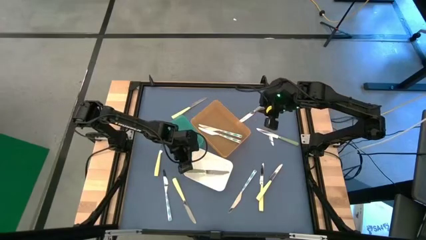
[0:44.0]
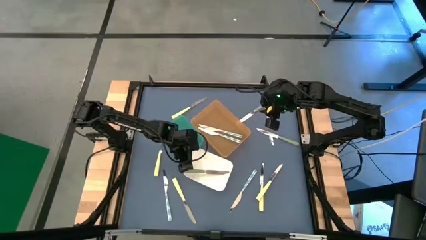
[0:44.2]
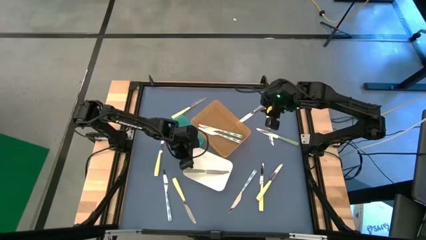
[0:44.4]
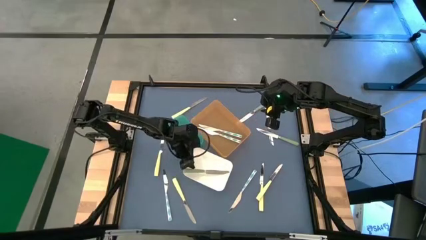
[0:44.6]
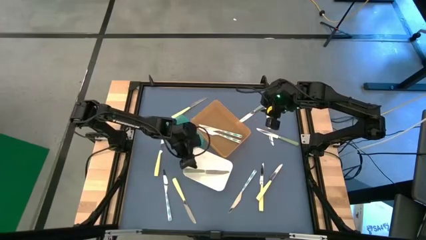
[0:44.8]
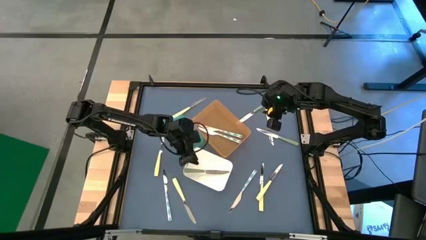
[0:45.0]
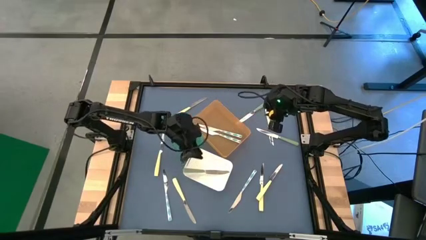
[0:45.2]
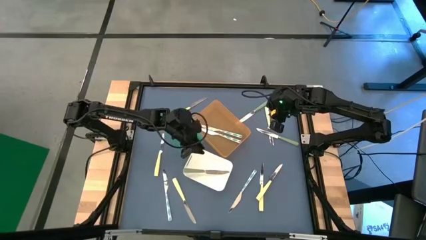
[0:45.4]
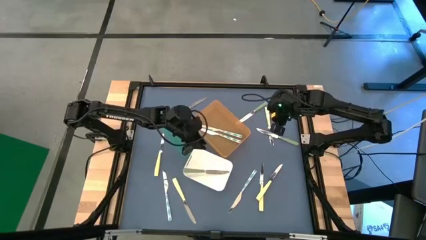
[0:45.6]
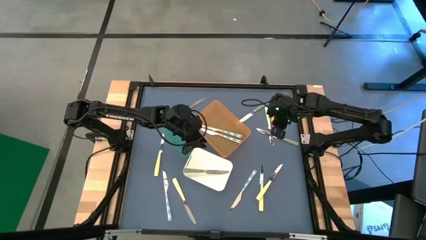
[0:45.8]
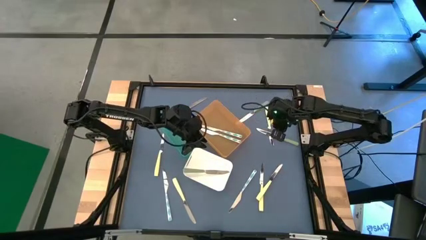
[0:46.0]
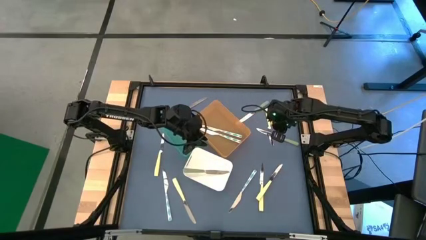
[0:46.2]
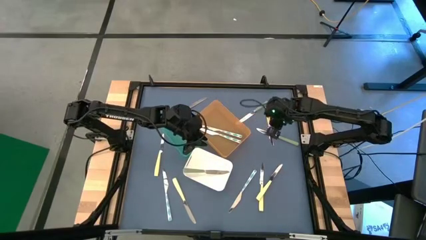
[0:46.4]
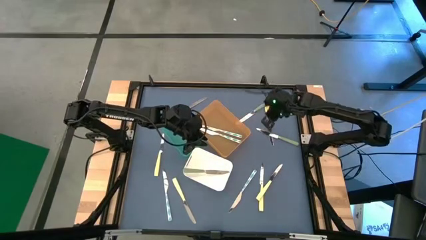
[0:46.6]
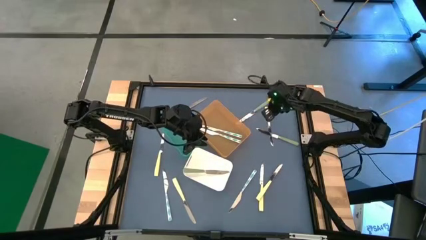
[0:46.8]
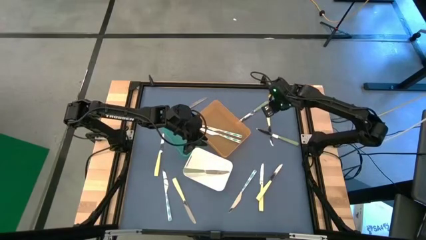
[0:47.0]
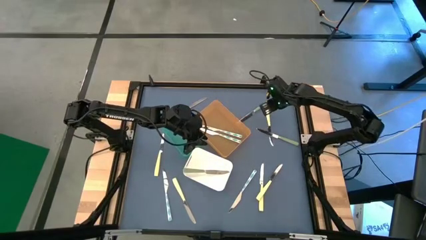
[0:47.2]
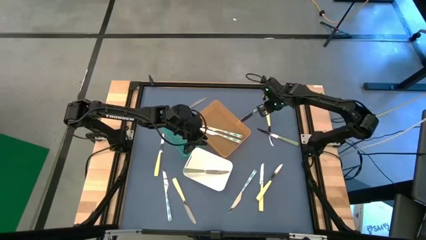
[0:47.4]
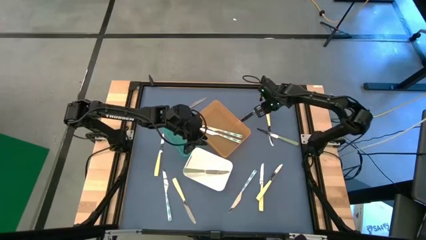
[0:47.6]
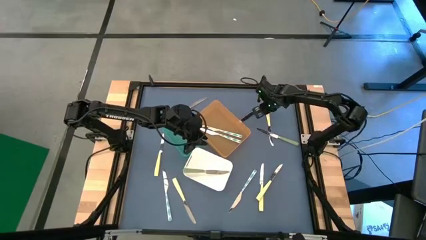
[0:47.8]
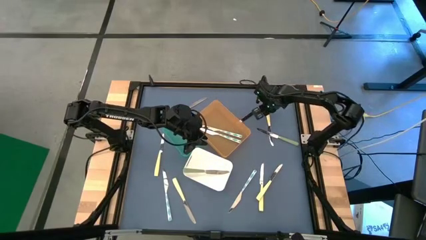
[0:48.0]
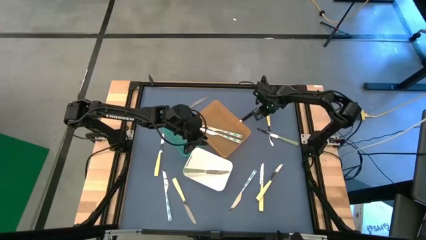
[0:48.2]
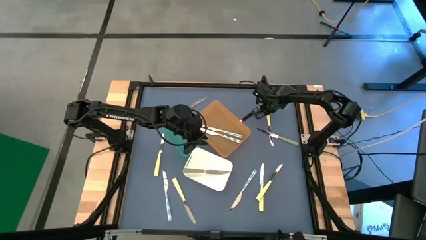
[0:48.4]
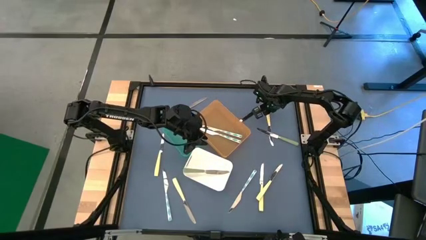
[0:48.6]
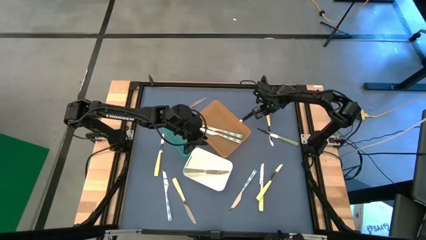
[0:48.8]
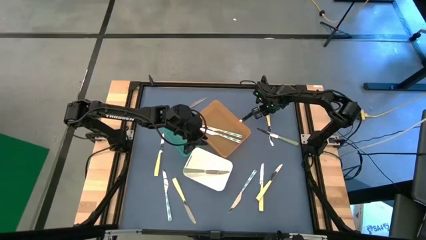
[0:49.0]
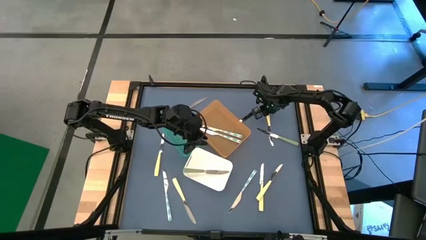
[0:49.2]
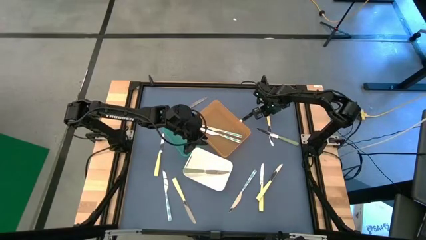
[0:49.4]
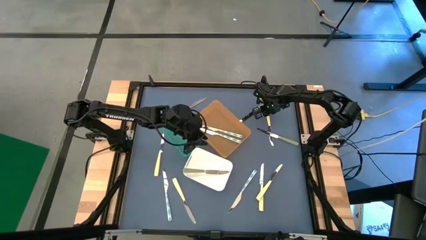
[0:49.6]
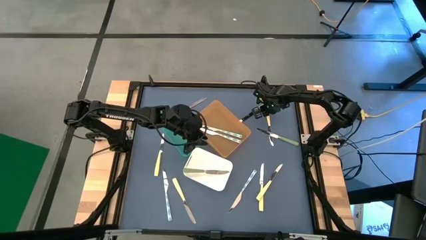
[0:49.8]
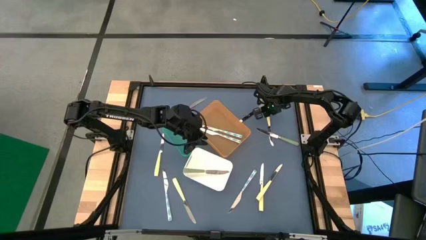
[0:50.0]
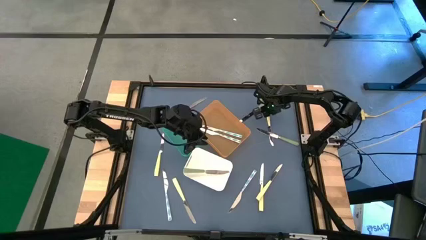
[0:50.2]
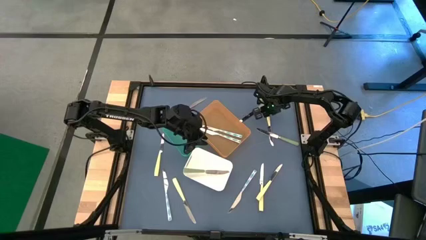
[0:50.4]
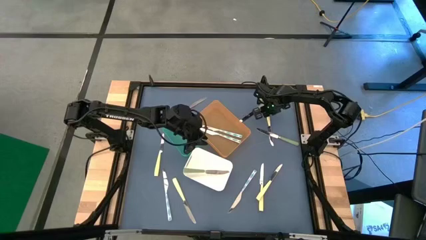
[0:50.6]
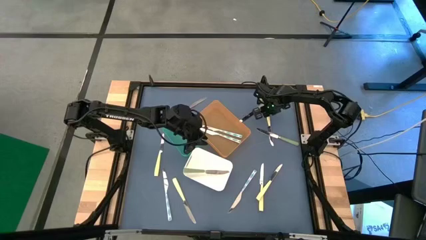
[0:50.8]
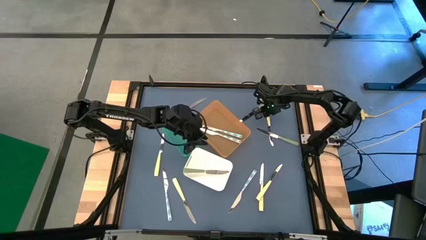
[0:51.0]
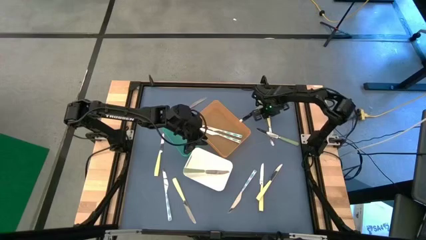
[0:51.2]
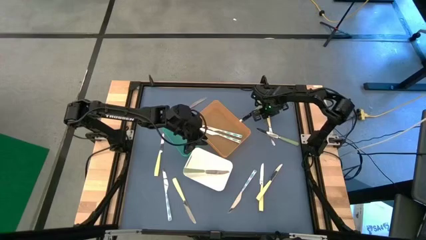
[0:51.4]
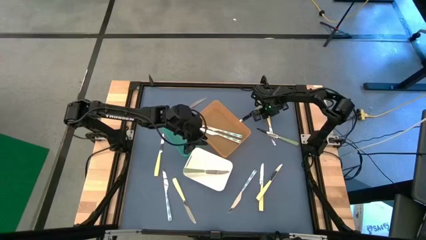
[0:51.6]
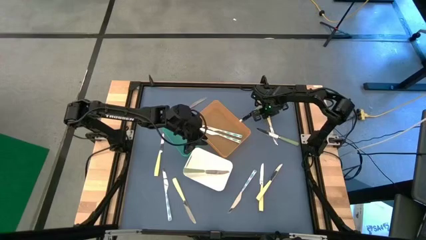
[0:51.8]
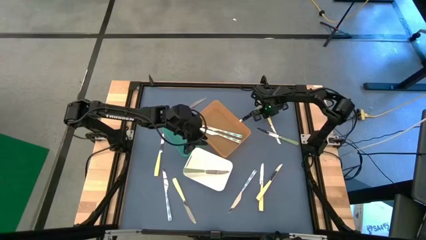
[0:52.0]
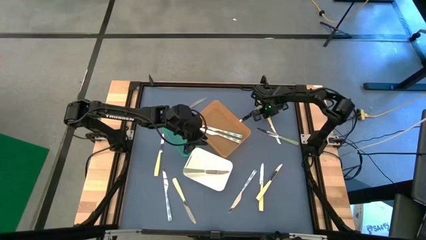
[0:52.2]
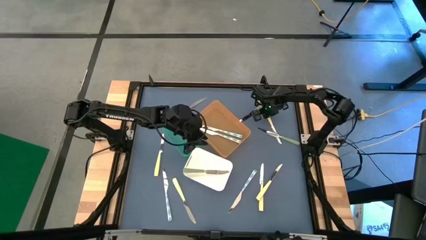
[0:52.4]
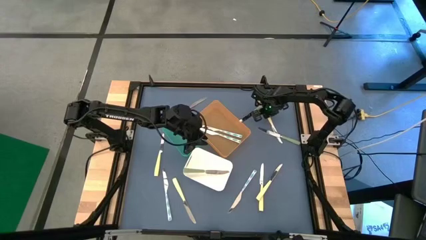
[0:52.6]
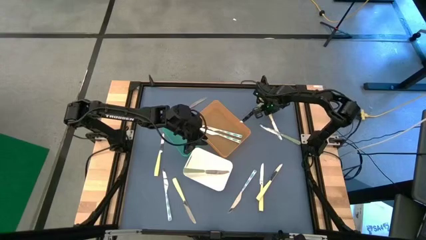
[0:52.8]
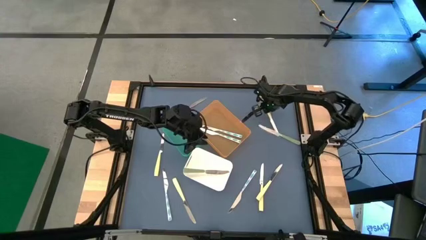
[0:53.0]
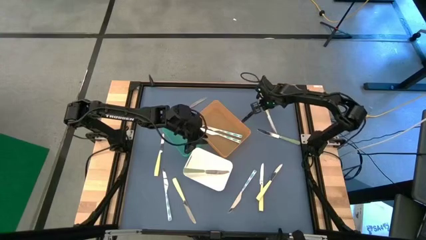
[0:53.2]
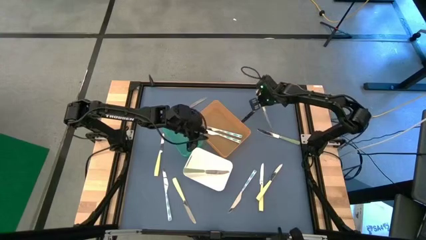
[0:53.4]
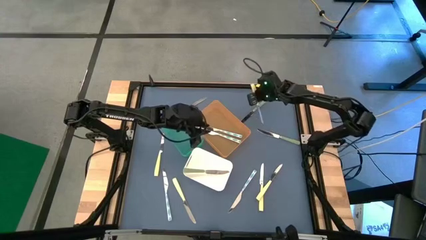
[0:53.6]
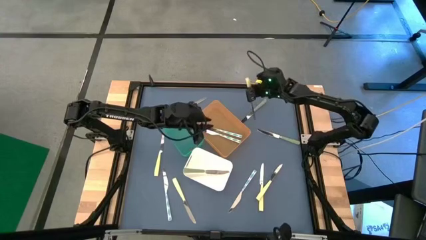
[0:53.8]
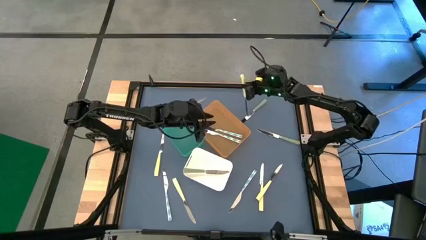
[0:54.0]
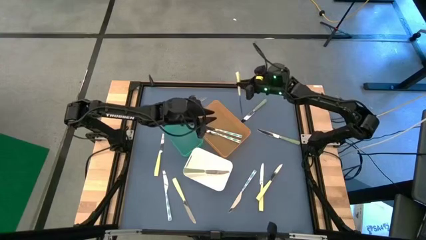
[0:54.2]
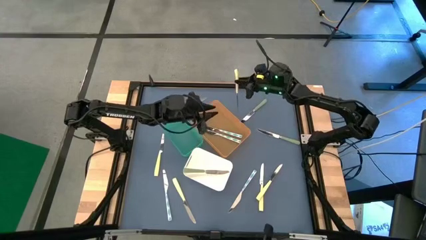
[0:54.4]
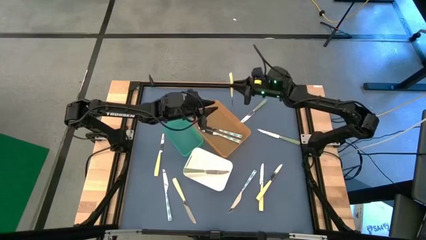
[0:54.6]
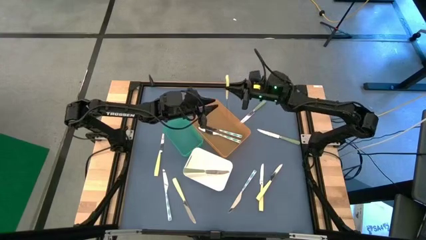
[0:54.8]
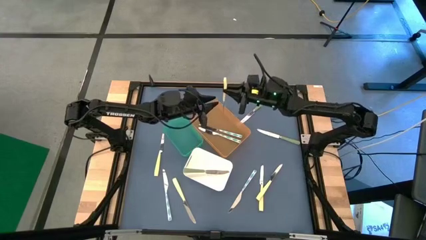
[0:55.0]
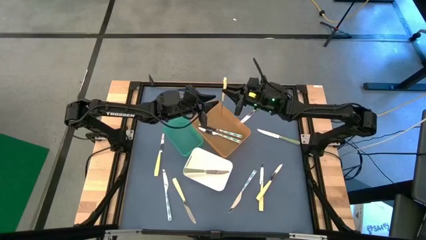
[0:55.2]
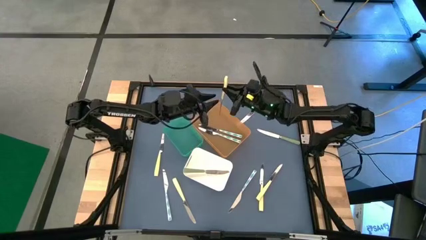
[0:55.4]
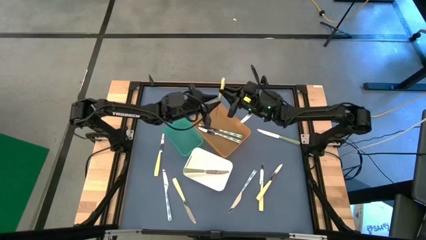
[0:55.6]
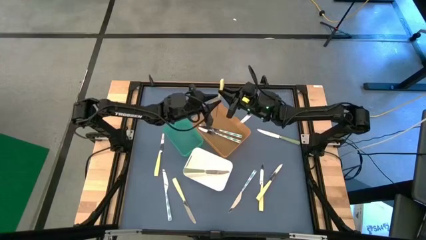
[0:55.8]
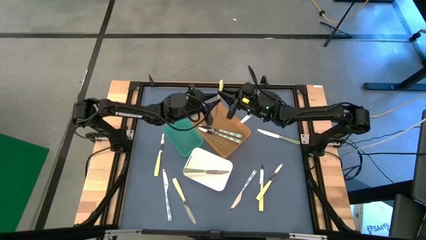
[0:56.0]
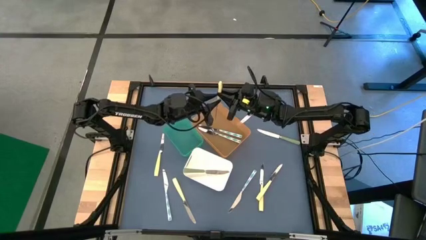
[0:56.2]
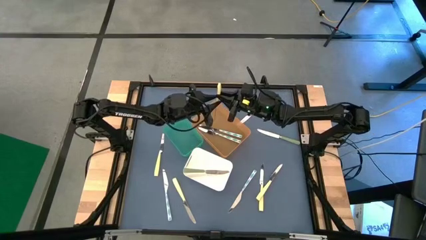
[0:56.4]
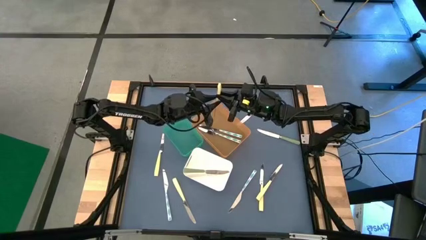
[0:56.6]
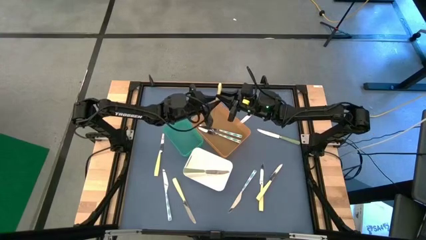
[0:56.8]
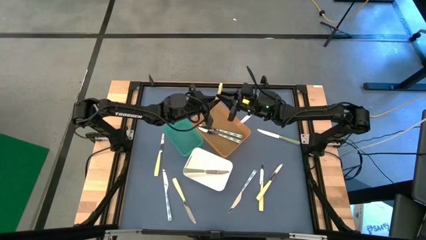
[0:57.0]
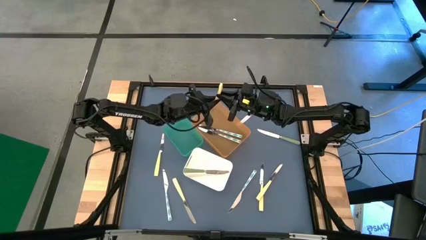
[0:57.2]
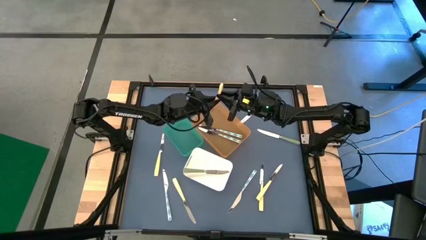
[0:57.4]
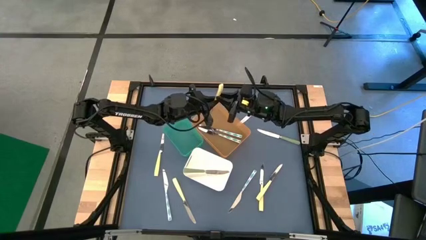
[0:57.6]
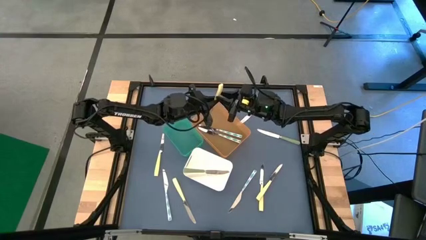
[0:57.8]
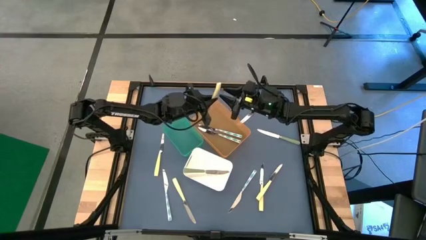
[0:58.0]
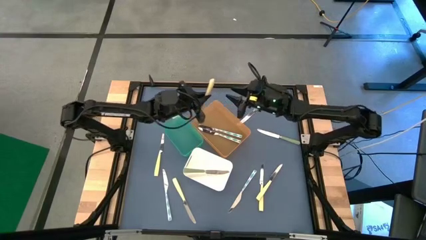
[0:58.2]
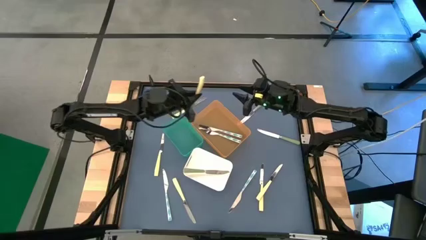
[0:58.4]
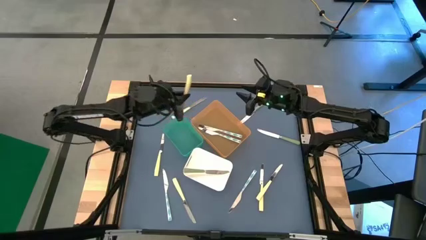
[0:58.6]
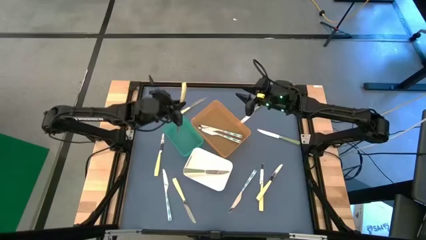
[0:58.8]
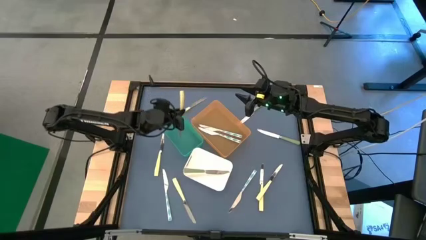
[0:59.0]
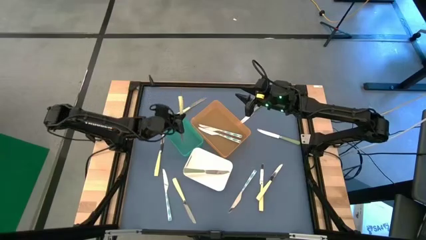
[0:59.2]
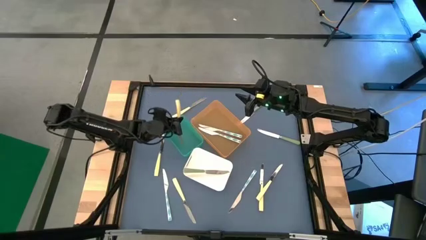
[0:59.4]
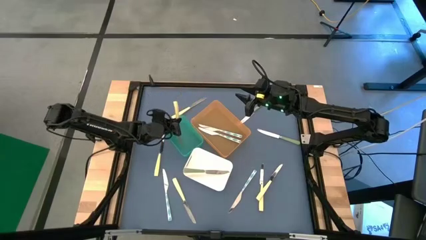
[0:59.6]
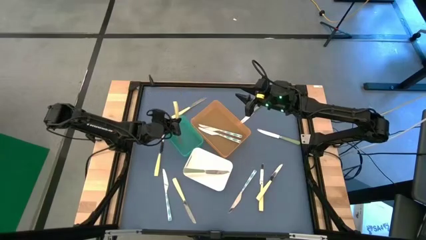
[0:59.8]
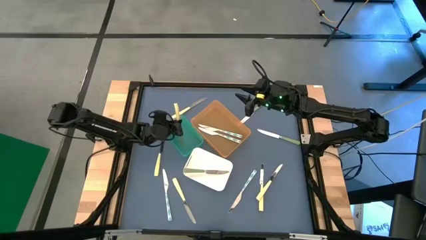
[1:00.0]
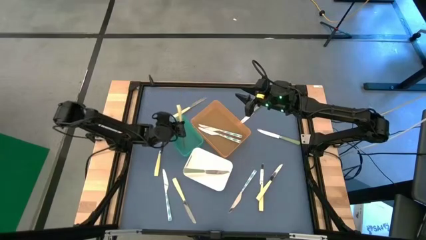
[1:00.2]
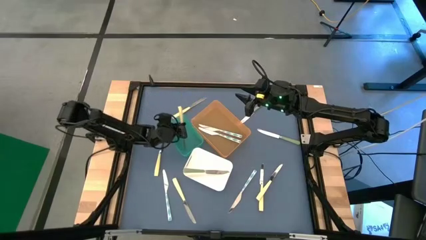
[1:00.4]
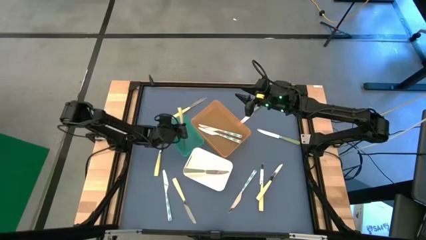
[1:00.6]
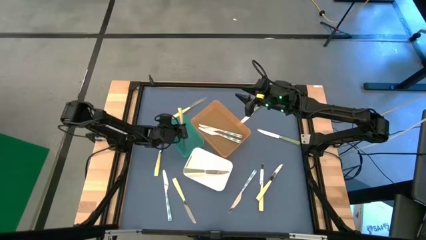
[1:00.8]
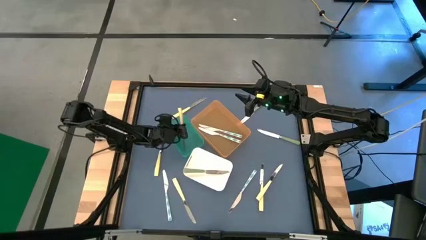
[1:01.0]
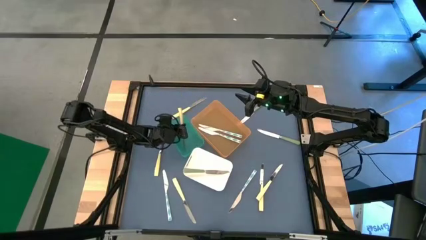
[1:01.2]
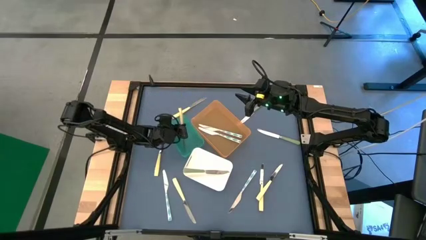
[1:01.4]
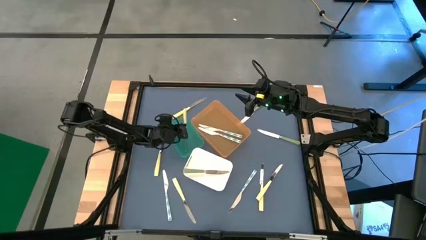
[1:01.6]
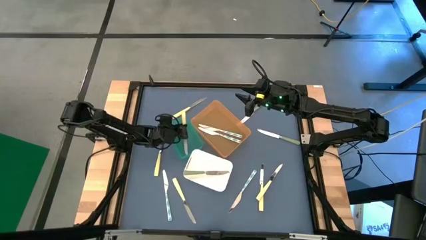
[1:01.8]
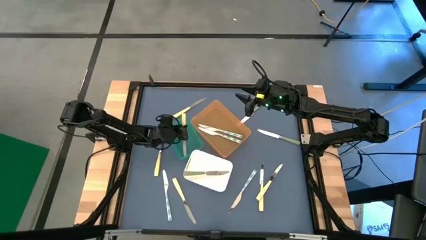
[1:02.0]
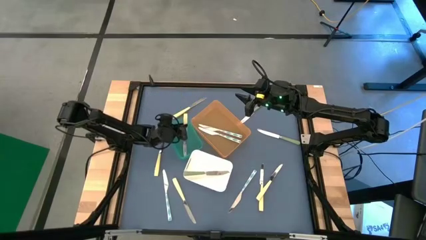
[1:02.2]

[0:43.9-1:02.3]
Task: Sort silverware by color (type)
Put the yellow table knife into the green bin
